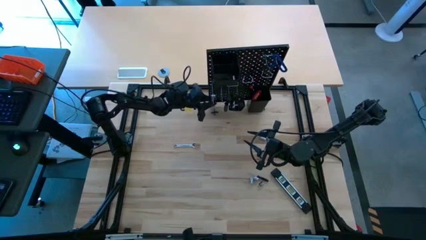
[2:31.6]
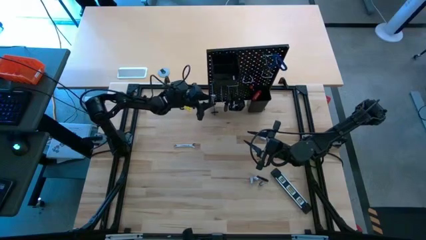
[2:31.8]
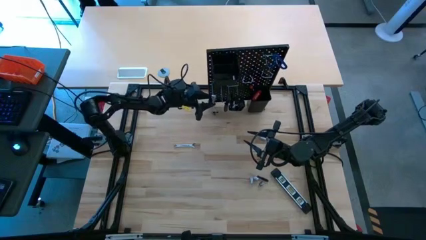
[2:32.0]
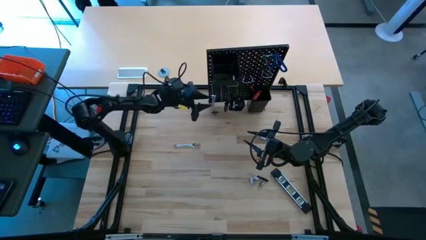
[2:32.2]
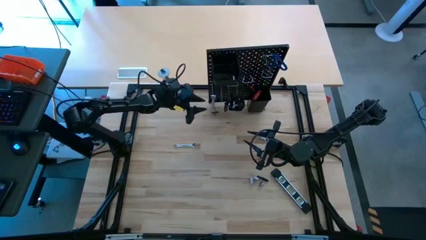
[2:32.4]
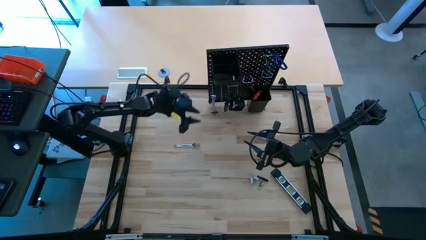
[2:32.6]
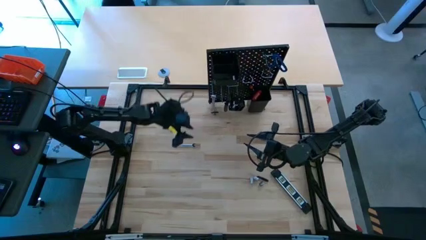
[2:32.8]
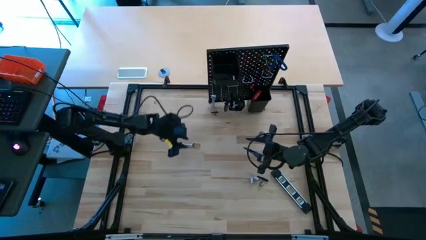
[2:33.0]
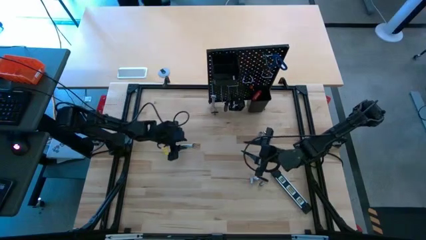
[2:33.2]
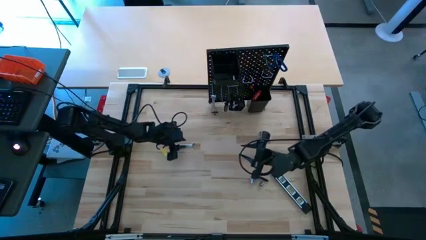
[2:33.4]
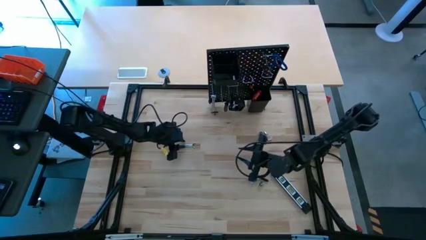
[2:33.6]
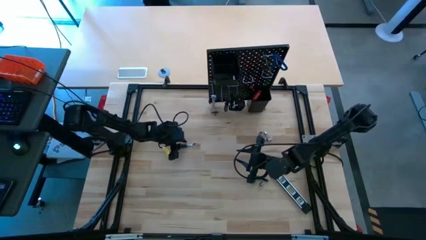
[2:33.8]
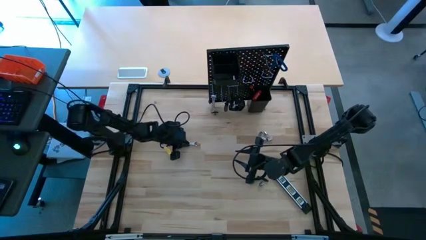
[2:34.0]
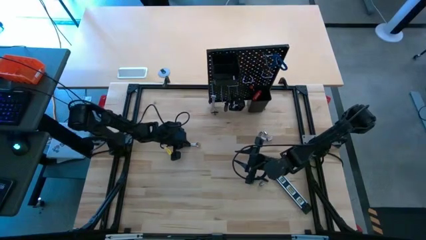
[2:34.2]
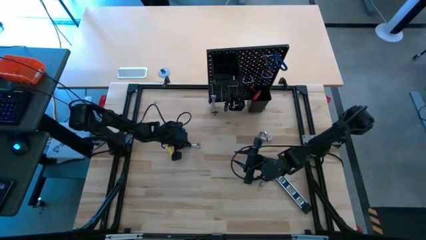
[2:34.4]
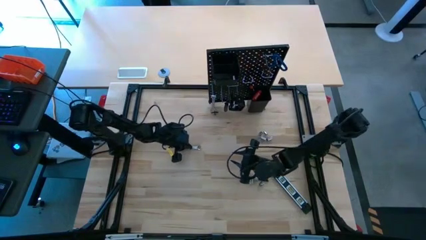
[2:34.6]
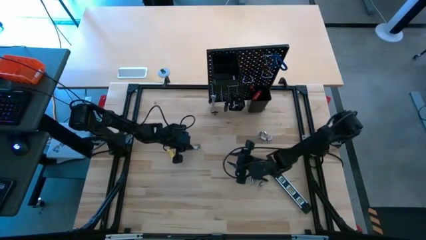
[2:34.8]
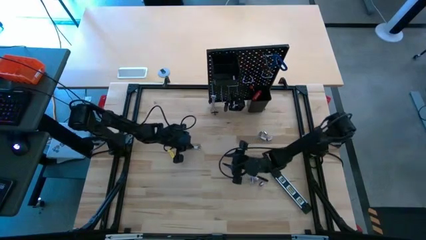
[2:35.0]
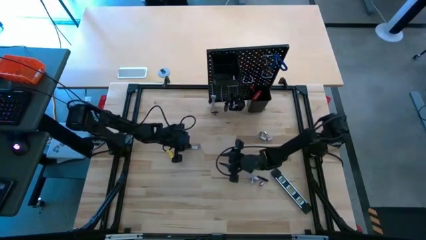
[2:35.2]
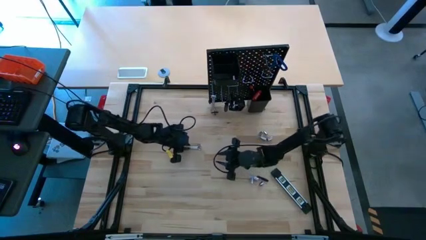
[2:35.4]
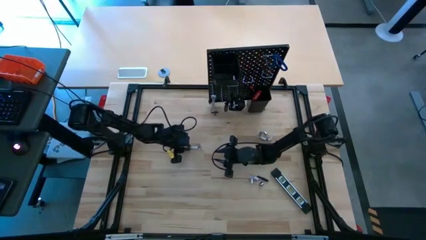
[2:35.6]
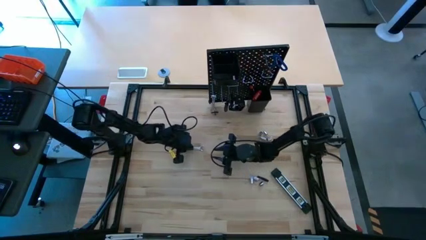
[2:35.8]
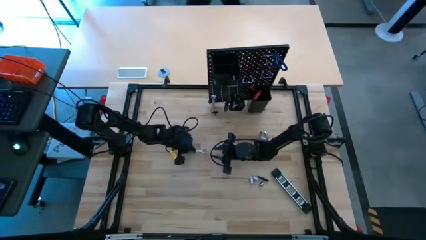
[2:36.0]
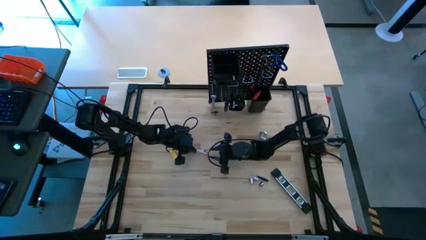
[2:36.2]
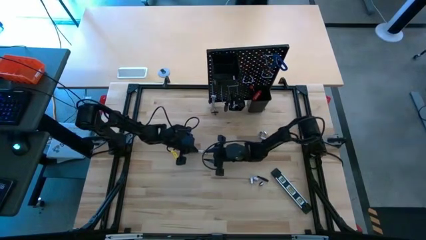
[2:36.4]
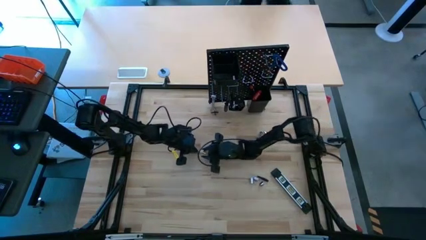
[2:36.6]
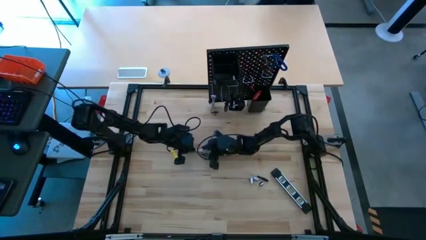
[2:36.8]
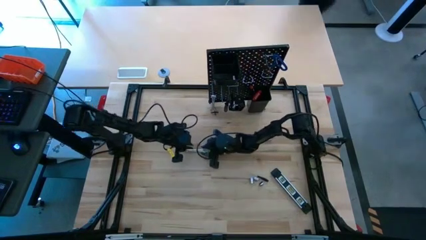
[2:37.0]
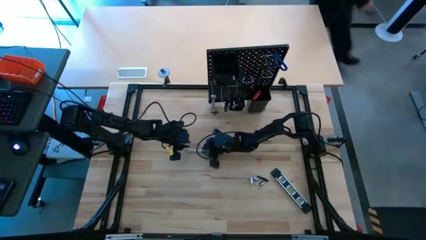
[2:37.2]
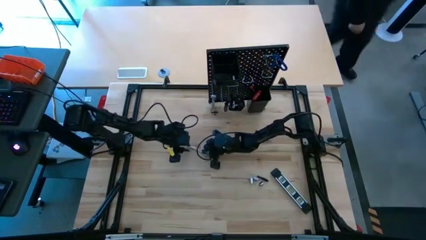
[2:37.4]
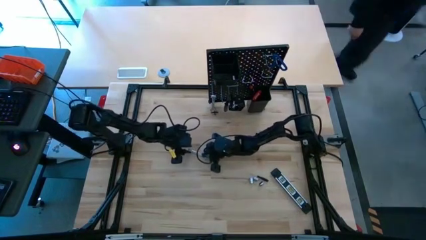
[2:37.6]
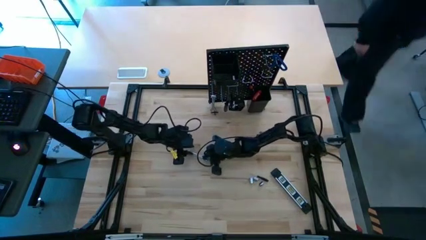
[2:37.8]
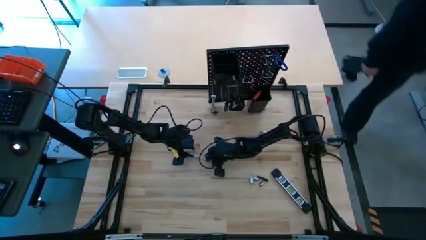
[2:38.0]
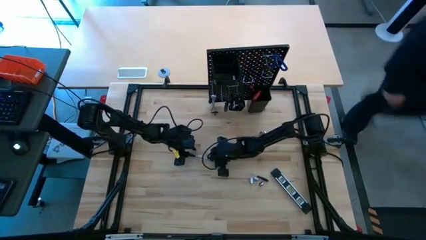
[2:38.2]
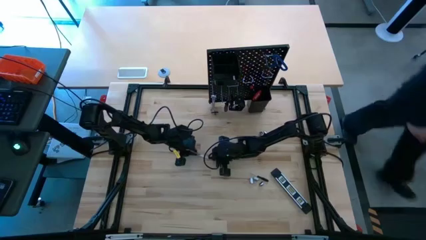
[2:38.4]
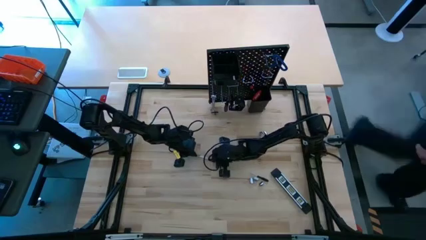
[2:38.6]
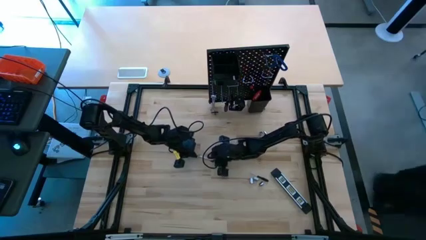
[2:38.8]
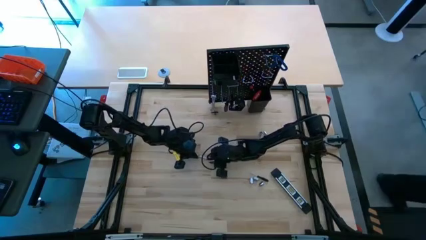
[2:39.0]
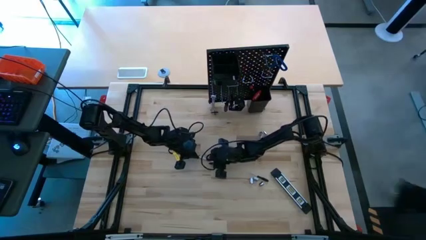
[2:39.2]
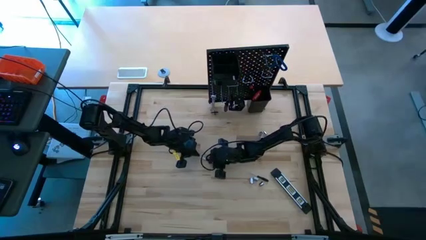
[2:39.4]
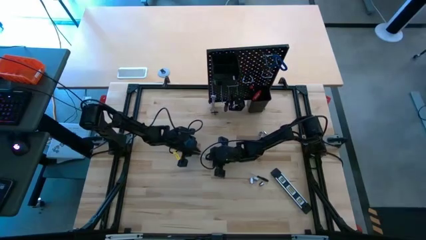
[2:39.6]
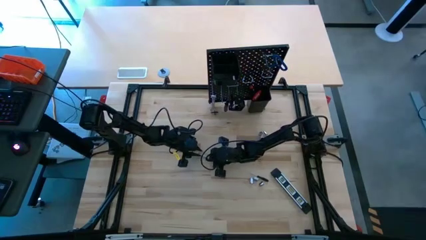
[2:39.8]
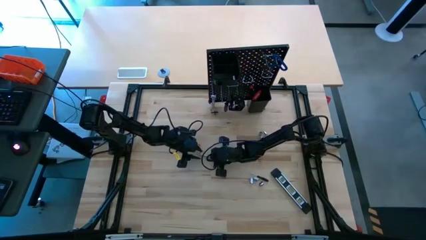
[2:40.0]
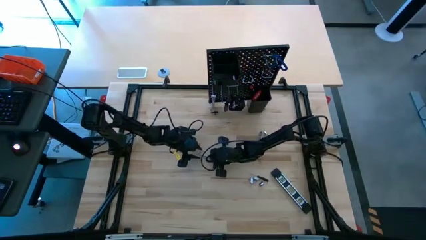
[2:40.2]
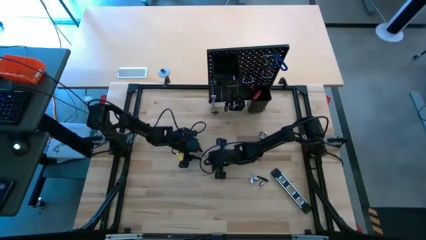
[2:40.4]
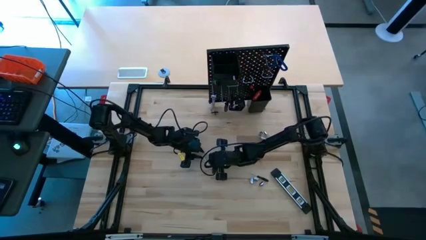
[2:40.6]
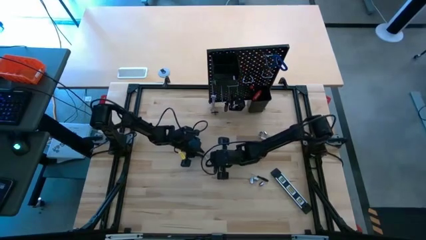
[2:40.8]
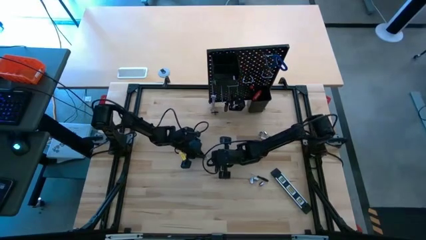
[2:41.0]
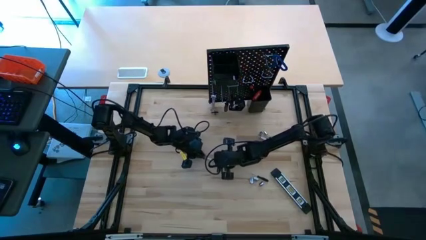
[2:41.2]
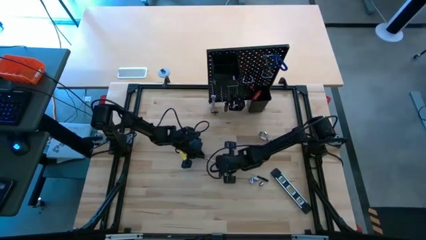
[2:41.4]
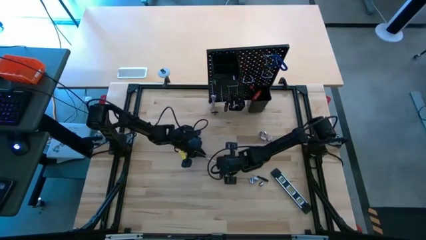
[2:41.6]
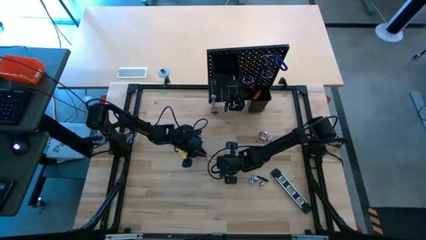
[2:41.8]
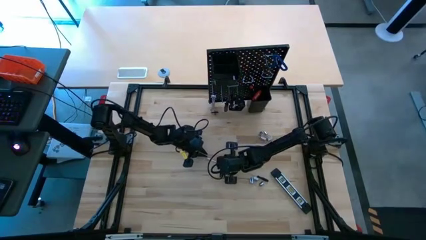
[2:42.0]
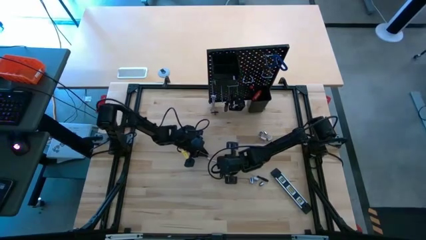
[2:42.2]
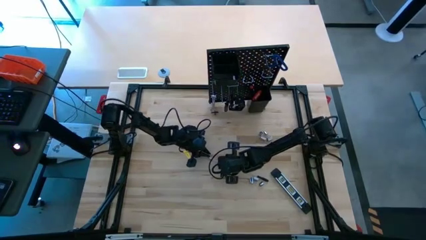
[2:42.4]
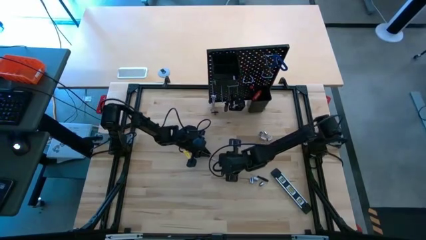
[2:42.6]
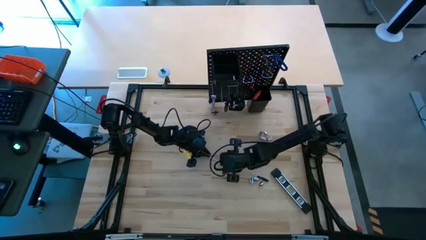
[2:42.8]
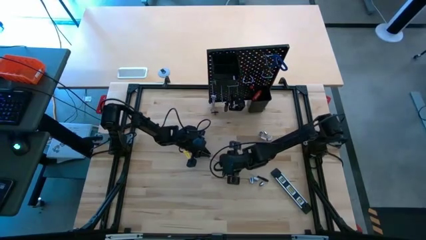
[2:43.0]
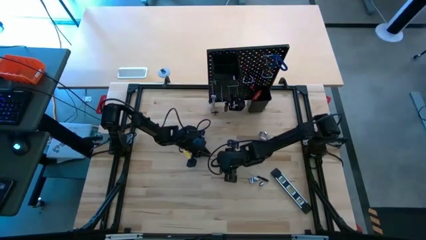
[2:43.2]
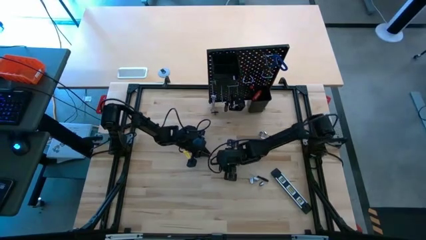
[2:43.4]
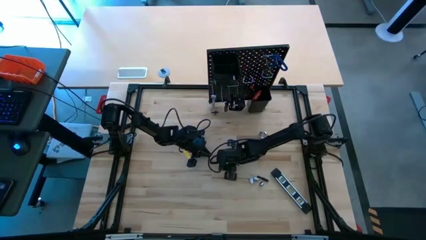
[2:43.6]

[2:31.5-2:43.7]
Task: Hang tools onto peg board
Hang the silver wrench on the peg board

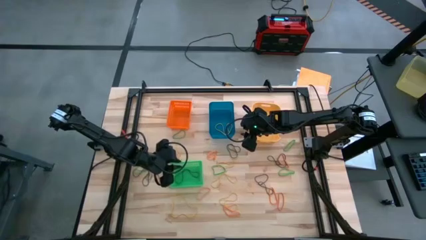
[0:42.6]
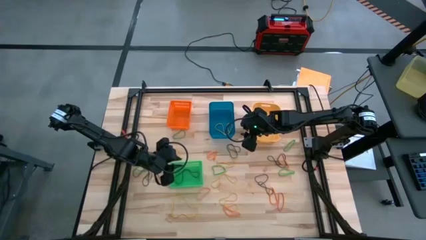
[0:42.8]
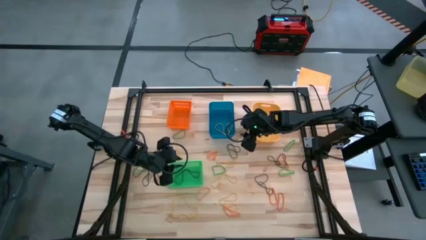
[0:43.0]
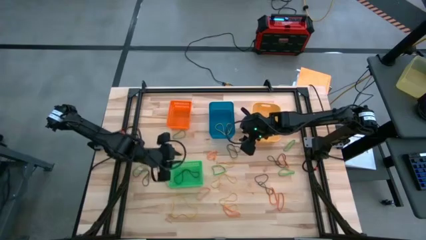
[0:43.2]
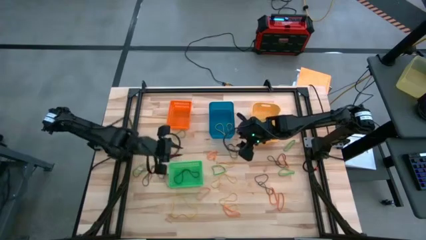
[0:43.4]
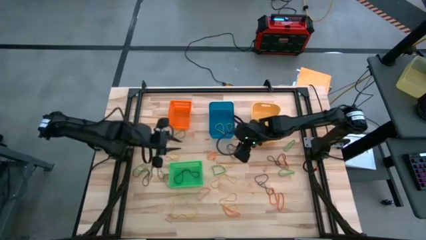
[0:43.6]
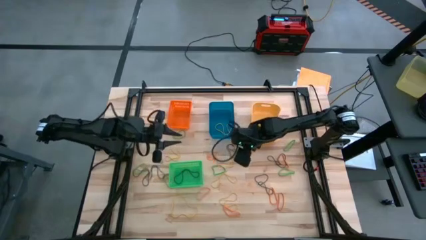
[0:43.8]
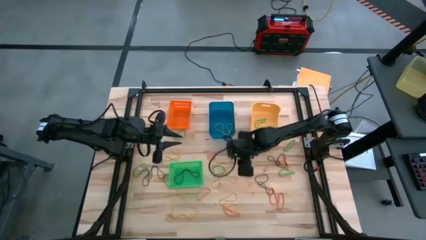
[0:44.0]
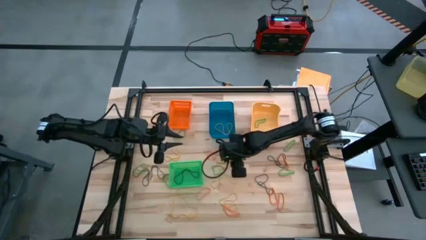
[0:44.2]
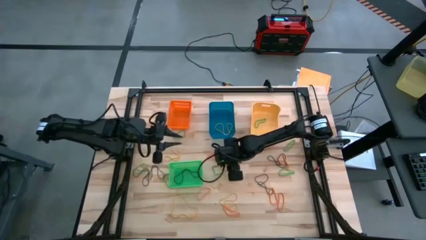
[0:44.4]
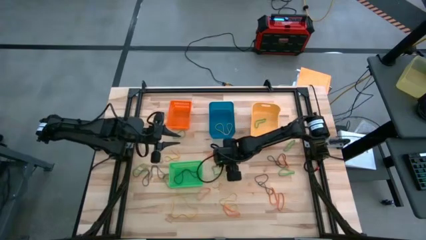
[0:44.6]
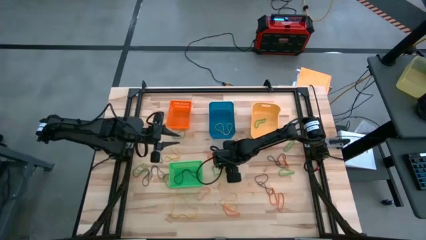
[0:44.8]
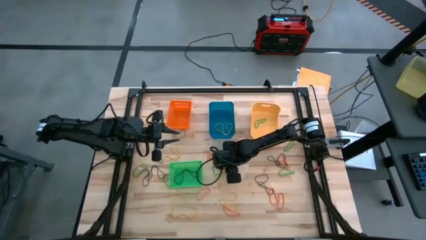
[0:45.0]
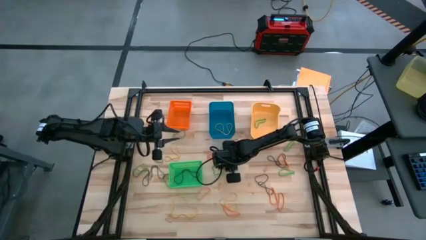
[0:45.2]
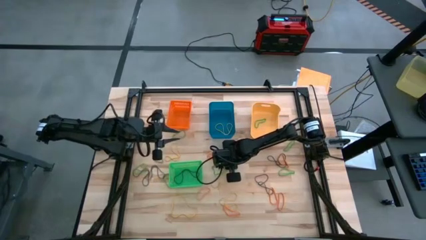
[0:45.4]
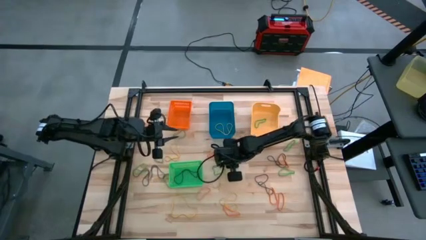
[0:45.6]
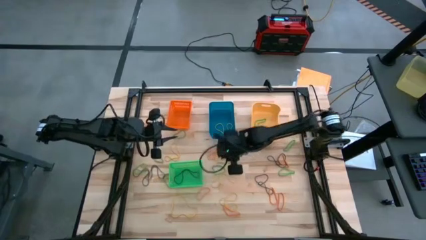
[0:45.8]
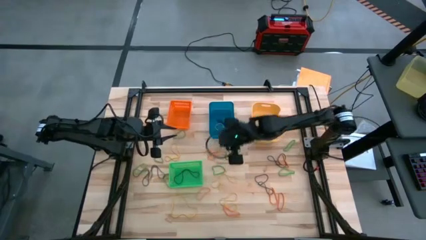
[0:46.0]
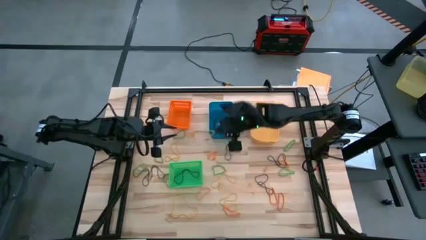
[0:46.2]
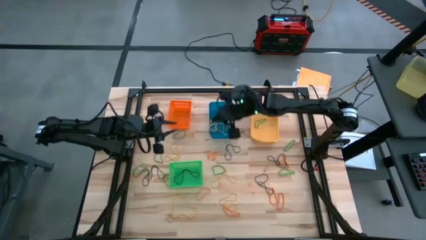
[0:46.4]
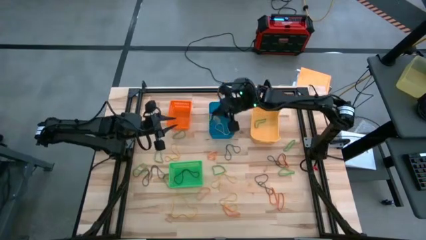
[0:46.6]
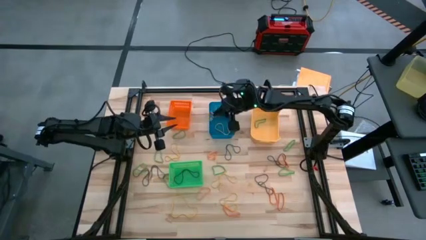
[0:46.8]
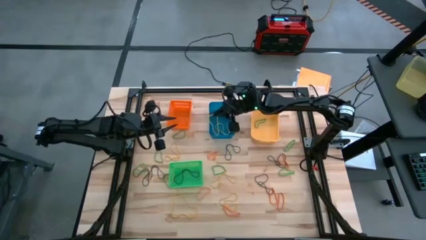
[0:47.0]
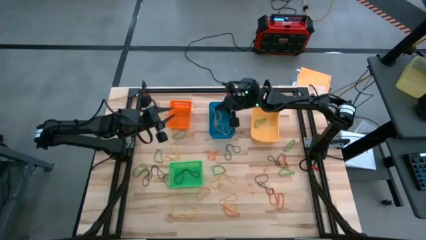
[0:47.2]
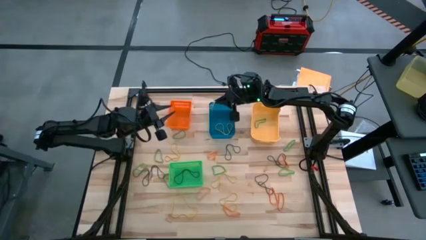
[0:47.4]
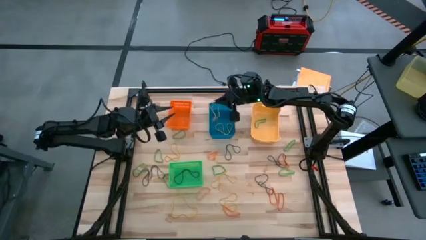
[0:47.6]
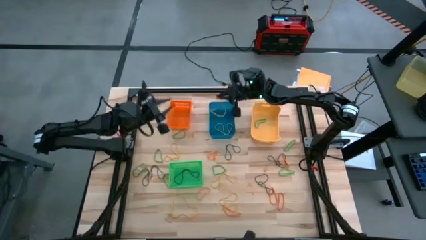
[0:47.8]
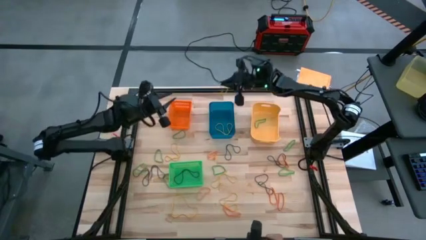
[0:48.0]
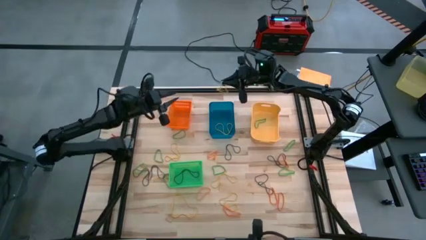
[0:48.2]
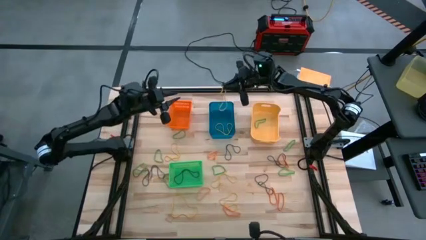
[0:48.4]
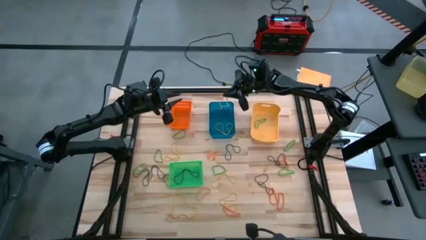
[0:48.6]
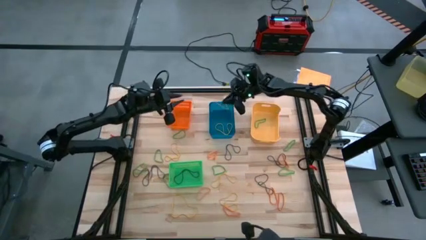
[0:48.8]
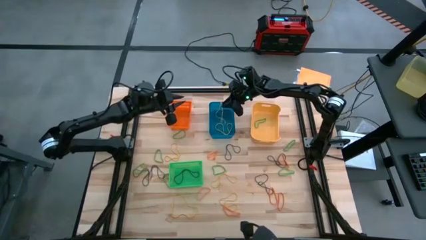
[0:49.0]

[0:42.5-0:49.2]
Task: Sort rubber bands into baskets
Put the yellow rubberband into the blue bin
